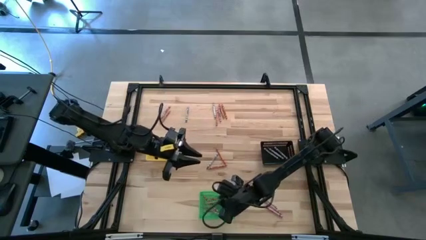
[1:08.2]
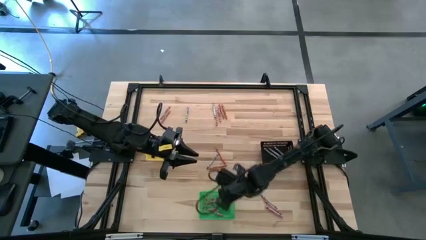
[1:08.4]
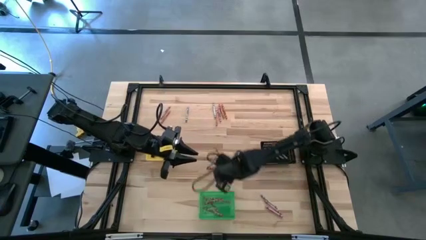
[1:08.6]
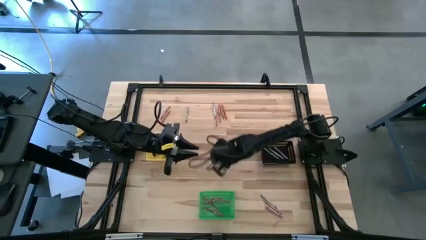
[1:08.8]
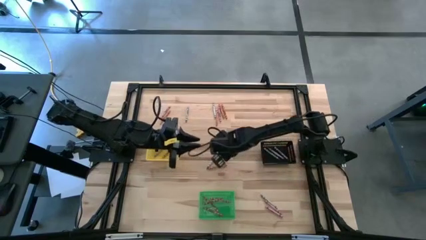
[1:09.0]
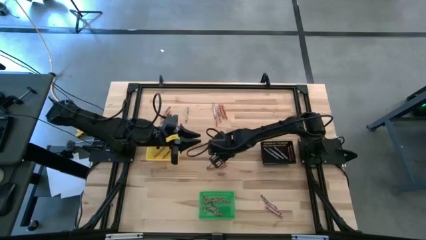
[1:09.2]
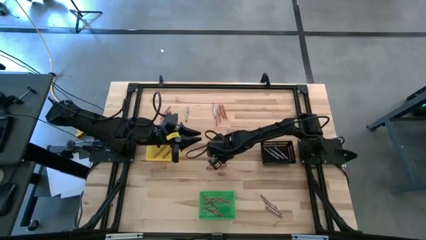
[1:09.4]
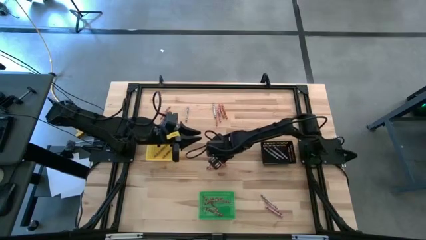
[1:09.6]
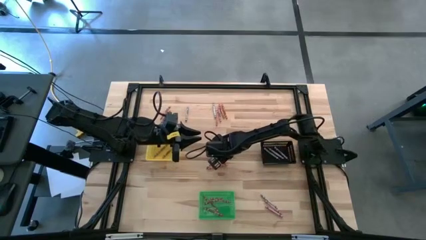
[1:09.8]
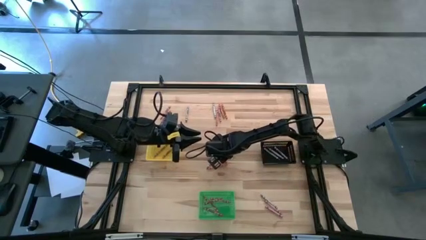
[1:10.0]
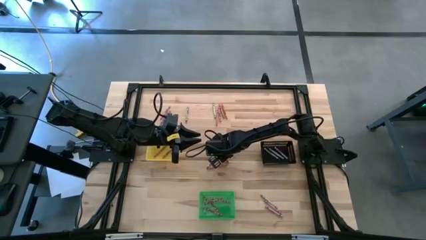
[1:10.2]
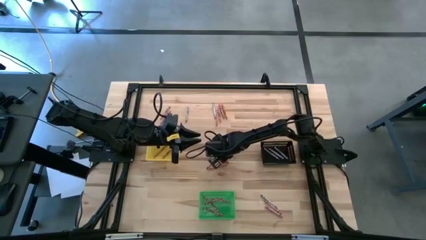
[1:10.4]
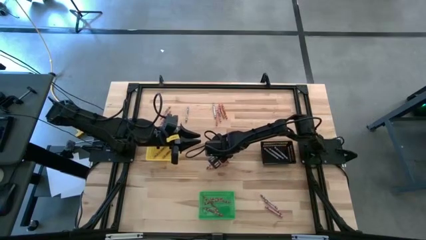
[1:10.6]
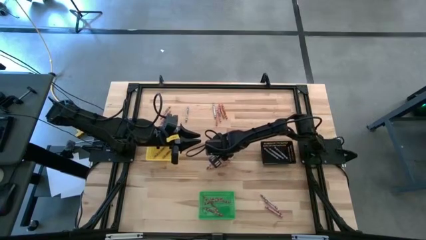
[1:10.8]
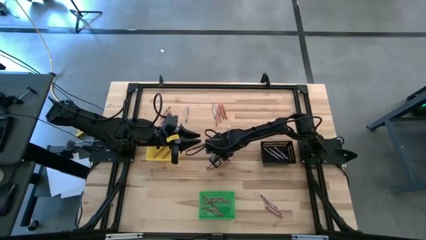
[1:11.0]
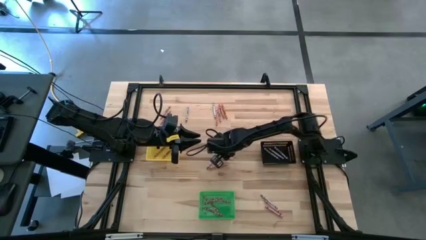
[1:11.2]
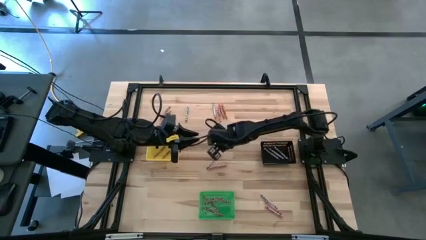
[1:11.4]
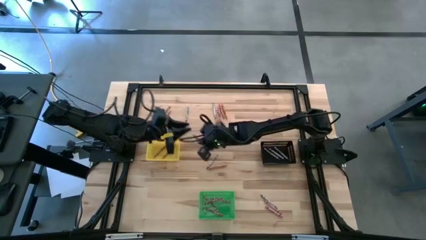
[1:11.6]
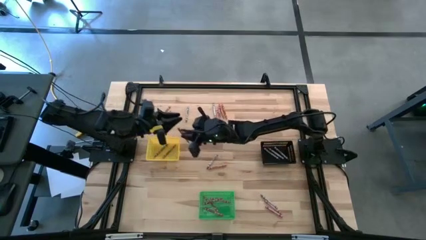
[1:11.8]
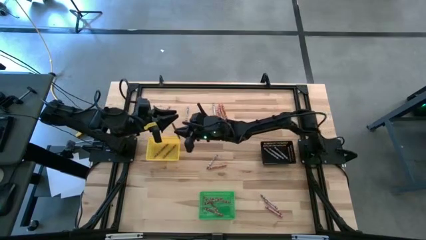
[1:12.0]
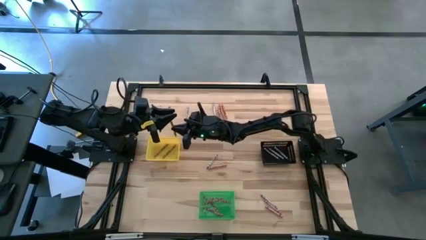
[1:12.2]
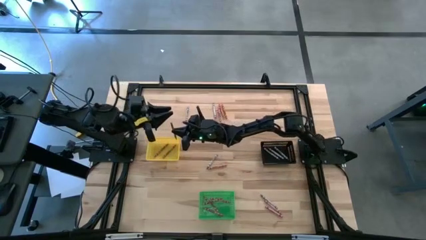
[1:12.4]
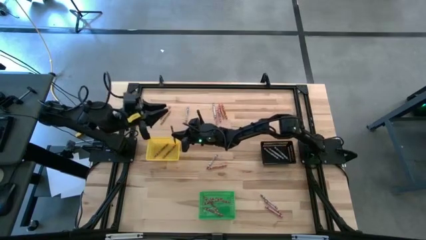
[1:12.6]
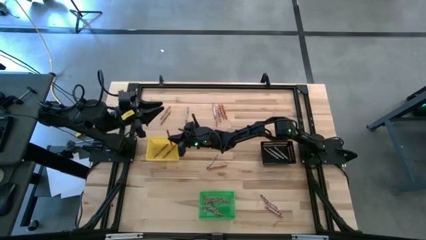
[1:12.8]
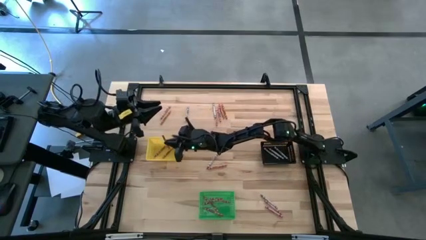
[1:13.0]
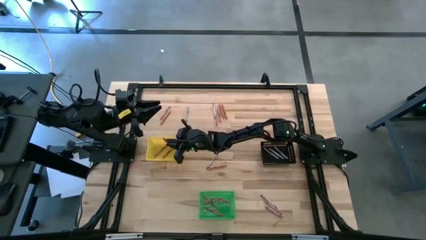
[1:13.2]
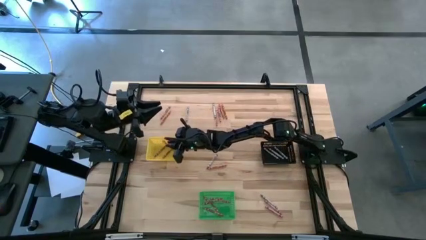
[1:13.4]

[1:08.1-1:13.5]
Task: Sort crayons
Put the orange crayon into the yellow bin

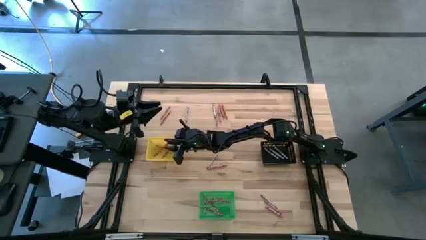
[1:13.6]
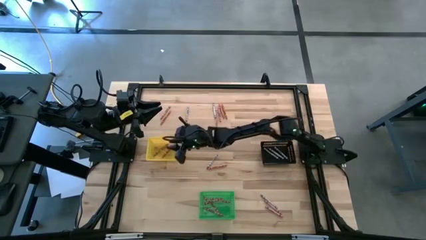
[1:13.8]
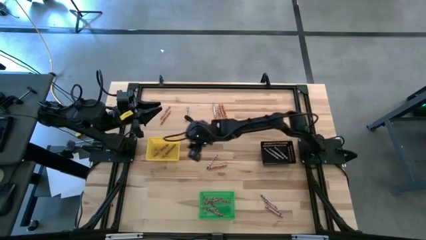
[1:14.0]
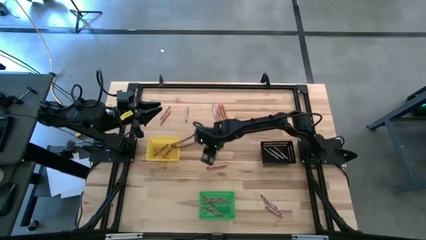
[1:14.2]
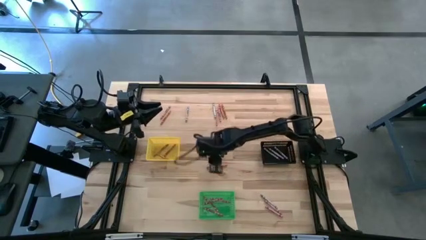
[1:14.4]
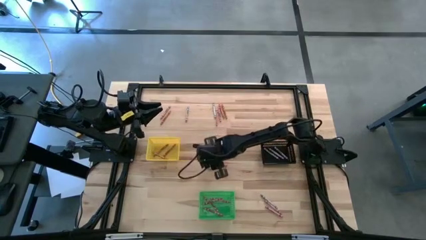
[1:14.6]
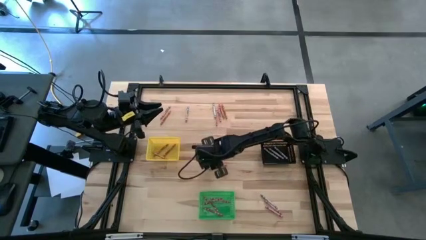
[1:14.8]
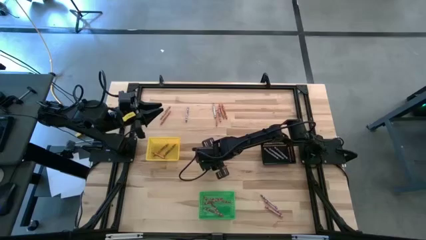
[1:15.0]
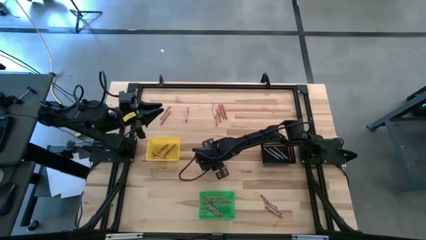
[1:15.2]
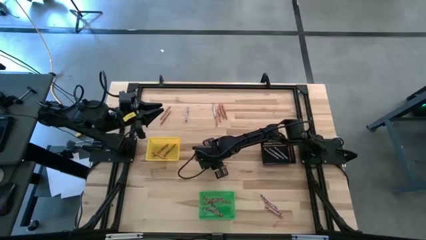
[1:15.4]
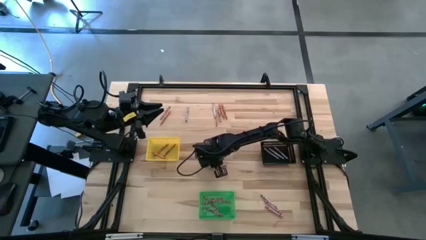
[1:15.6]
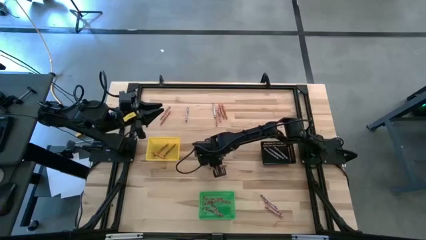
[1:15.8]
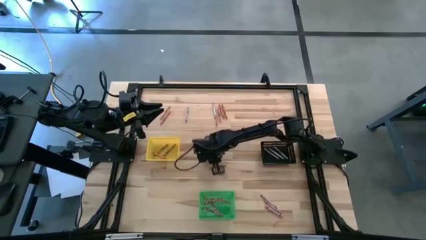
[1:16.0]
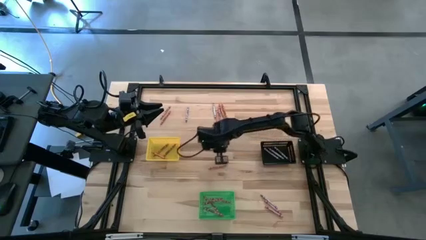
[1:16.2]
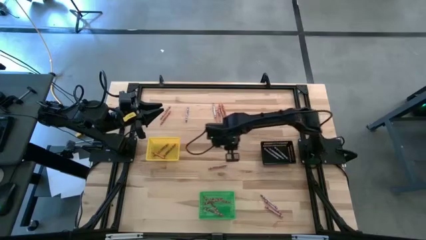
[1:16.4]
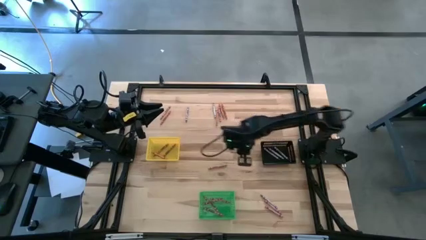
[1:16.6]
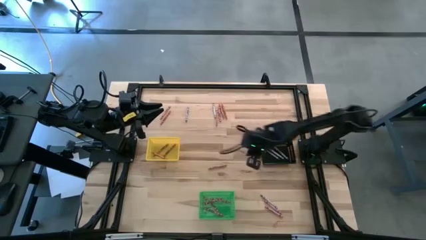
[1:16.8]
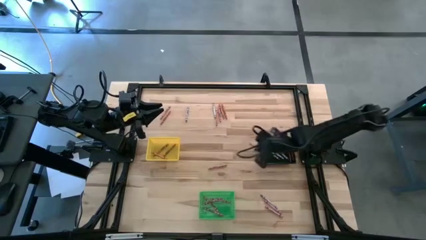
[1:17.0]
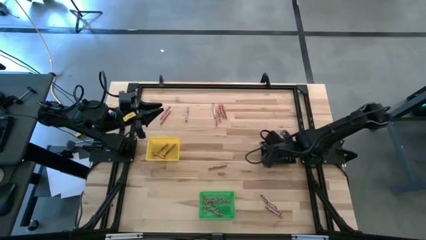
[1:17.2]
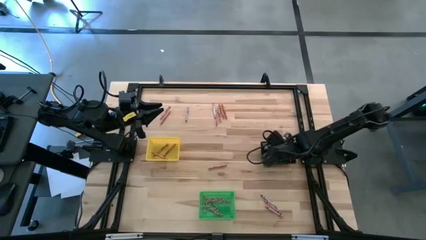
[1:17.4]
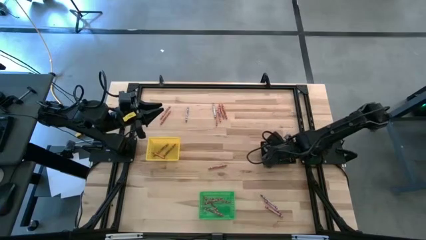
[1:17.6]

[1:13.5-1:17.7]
Put the gray crayon into the black bin

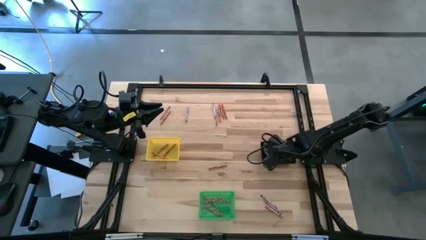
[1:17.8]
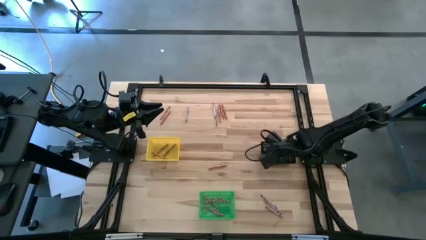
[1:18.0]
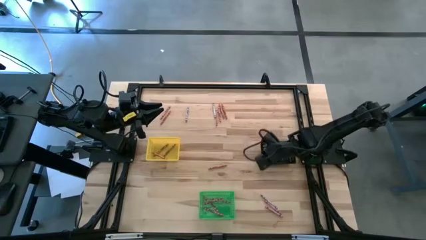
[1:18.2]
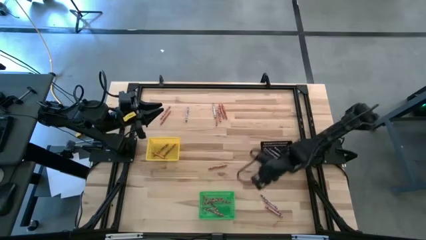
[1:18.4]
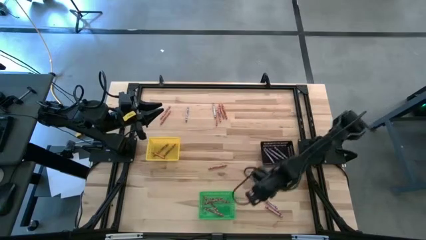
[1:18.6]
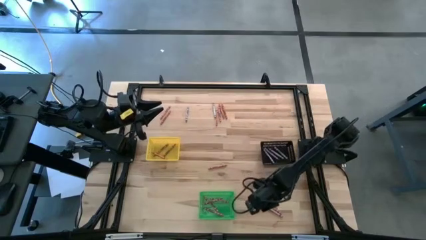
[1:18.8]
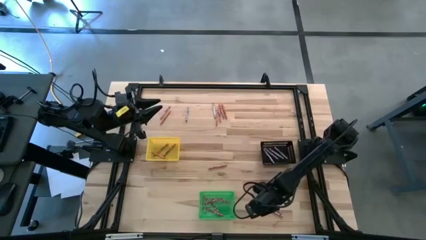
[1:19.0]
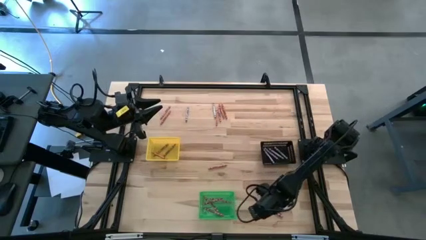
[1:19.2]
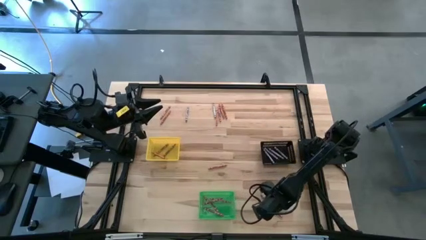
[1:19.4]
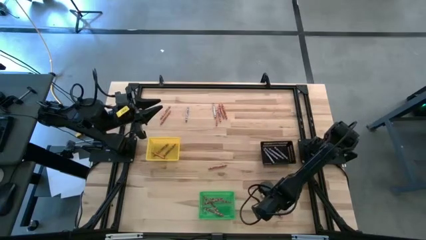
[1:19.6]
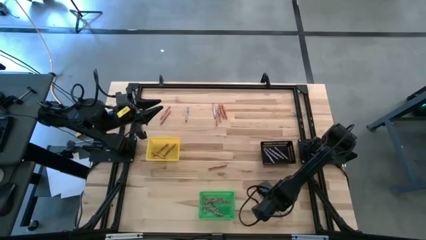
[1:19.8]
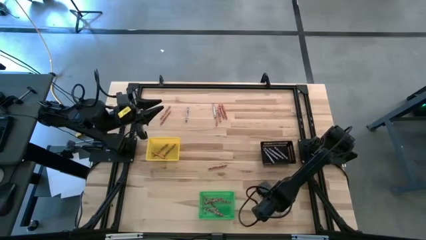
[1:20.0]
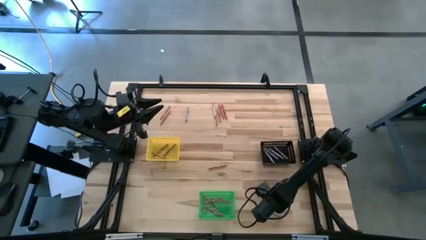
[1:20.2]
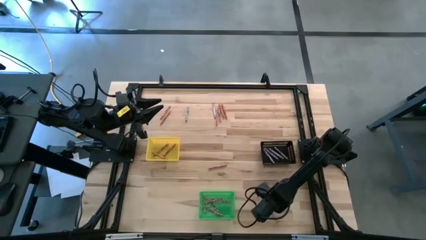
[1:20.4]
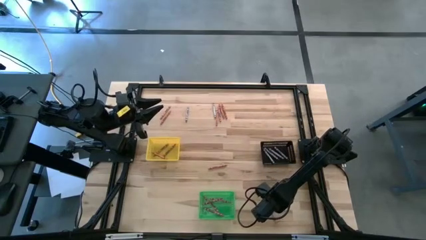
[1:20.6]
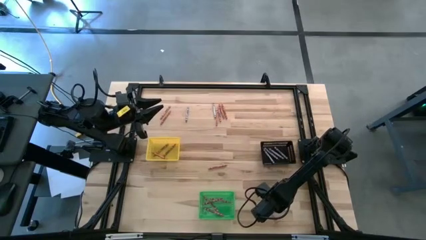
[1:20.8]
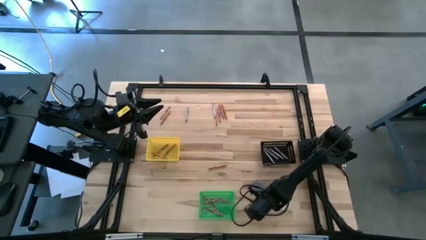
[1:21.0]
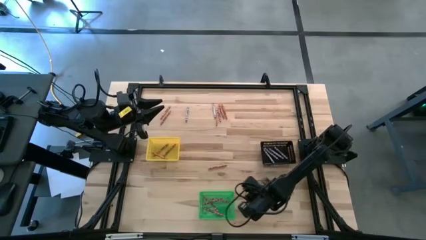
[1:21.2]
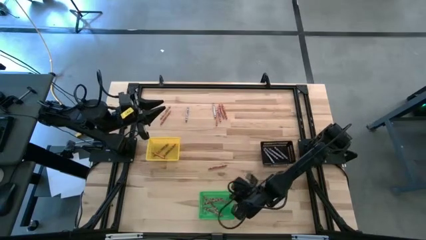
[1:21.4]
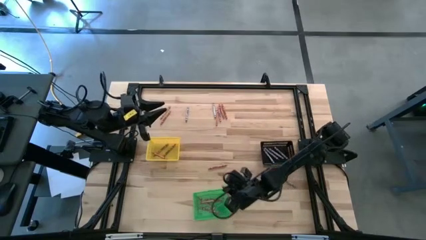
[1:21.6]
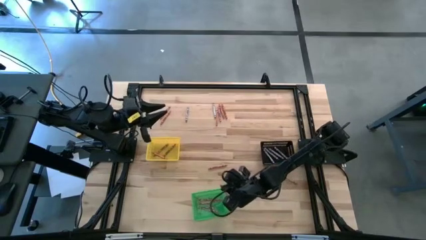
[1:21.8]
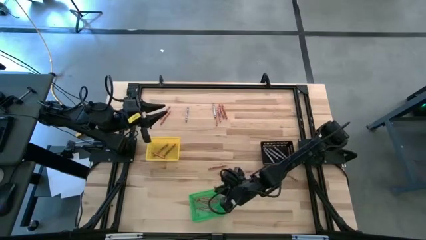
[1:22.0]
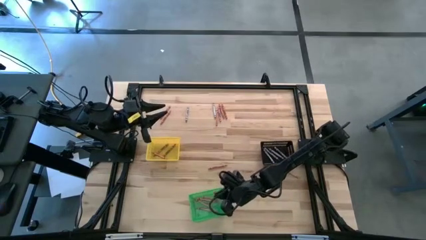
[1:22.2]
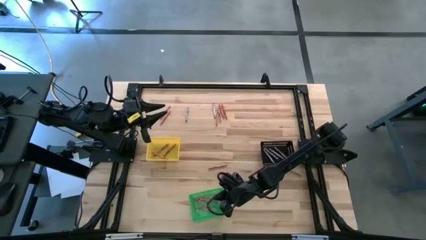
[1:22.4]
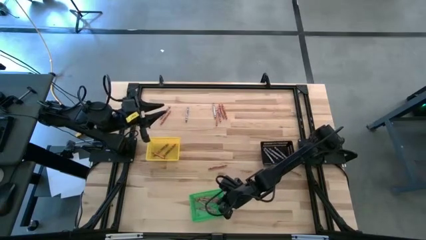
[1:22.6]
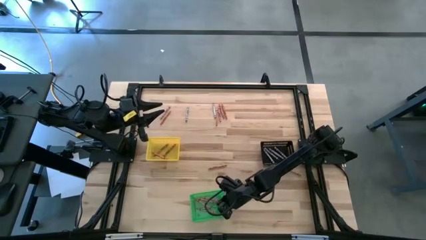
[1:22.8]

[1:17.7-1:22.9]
Put the pink crayon into the green bin

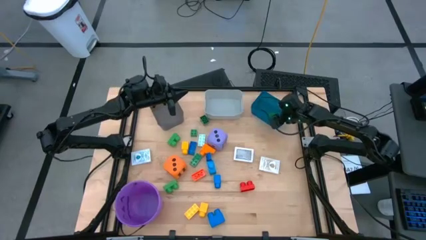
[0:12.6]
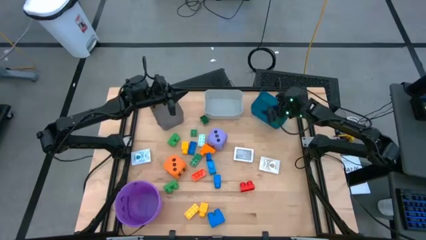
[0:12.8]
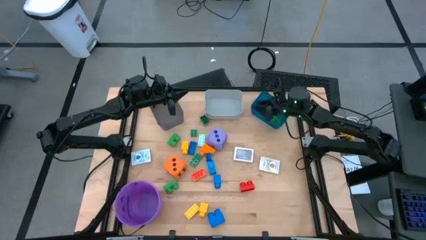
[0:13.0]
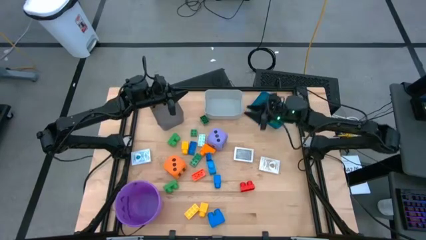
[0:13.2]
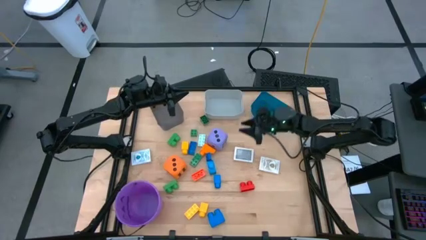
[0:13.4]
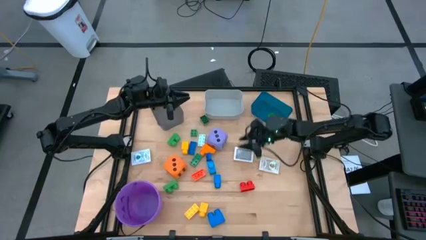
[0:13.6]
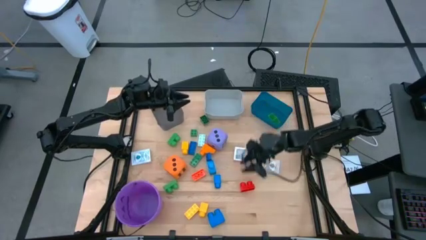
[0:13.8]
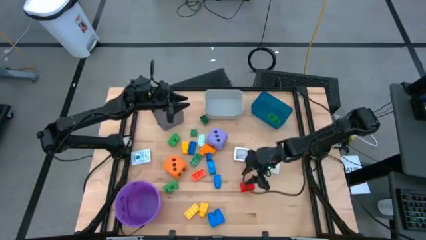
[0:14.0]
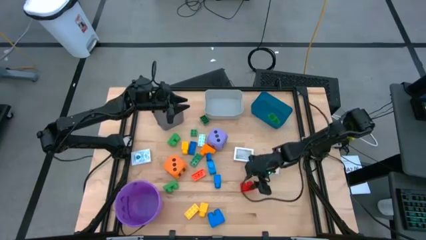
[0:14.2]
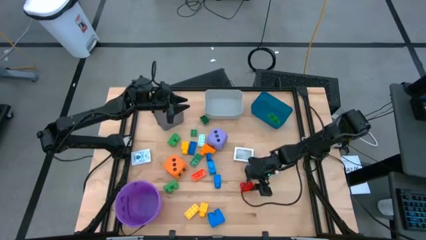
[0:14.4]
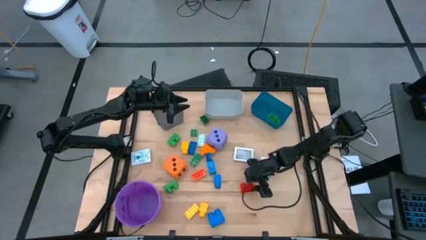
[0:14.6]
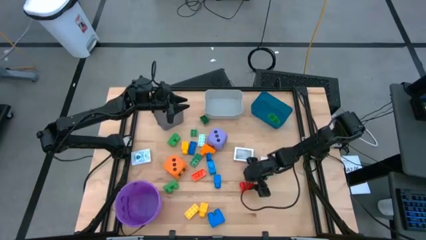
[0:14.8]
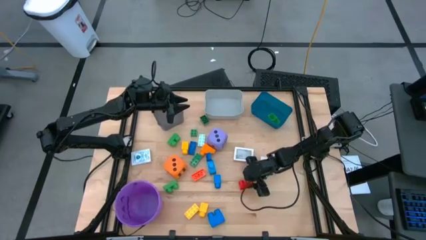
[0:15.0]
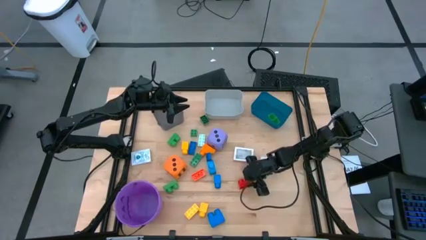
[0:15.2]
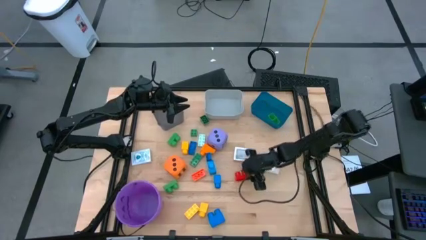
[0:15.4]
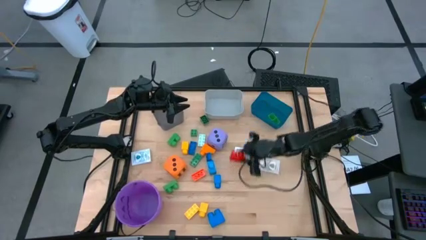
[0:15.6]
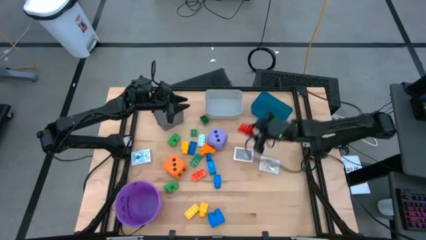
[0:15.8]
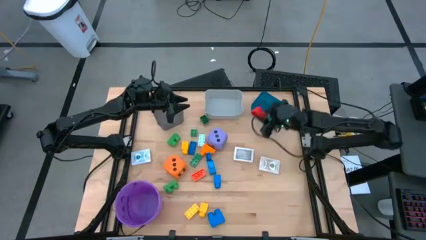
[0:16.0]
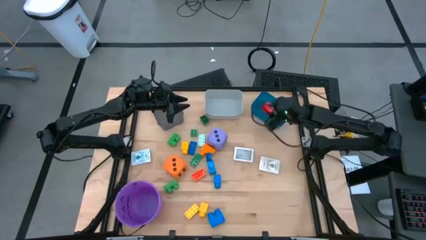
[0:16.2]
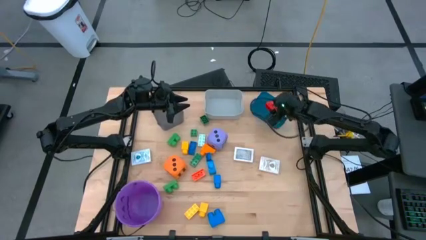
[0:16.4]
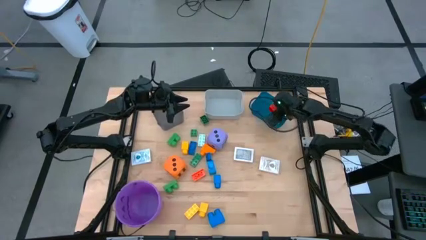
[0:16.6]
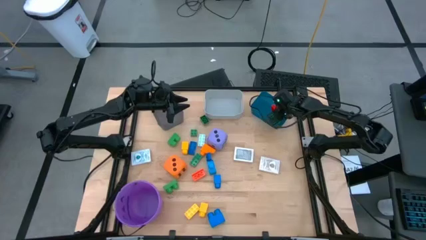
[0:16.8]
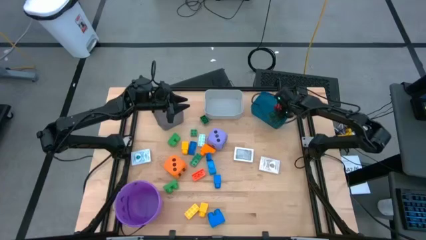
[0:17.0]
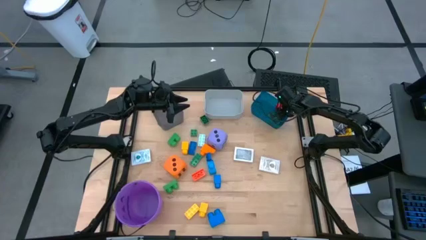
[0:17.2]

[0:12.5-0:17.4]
Task: Pick & Place Toys
Put the red game piece into the blue bin
